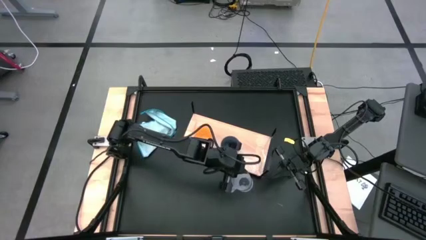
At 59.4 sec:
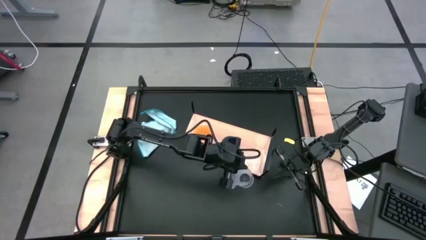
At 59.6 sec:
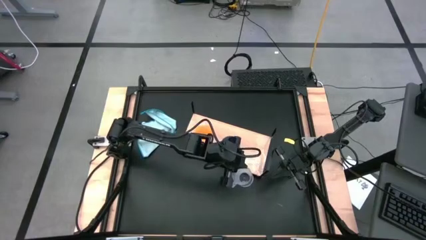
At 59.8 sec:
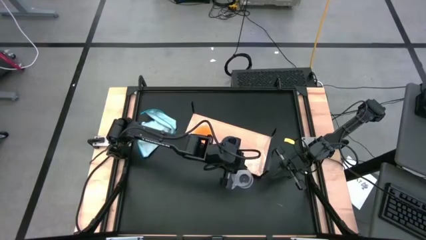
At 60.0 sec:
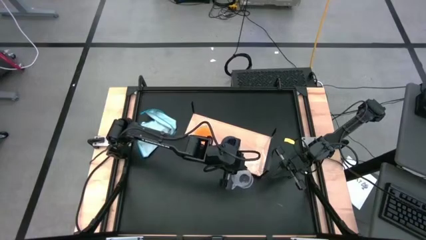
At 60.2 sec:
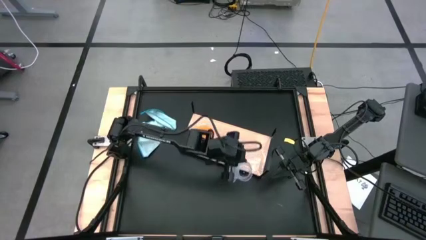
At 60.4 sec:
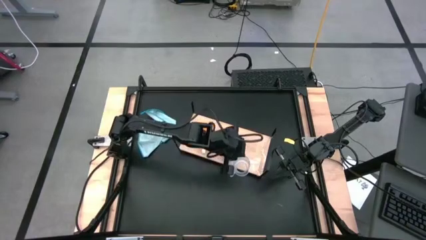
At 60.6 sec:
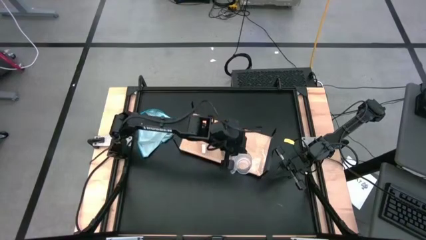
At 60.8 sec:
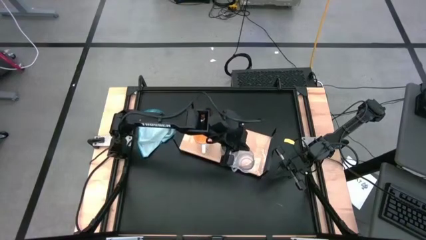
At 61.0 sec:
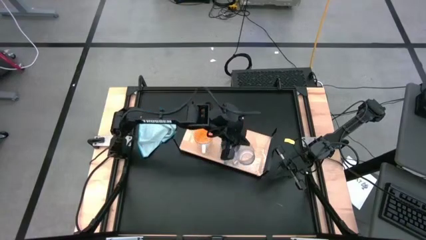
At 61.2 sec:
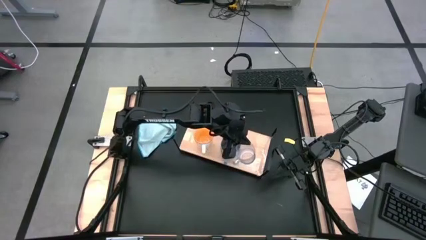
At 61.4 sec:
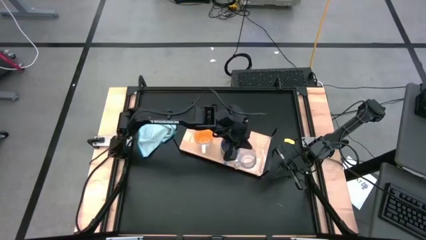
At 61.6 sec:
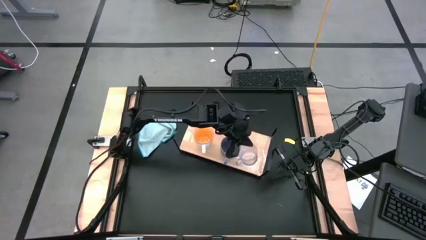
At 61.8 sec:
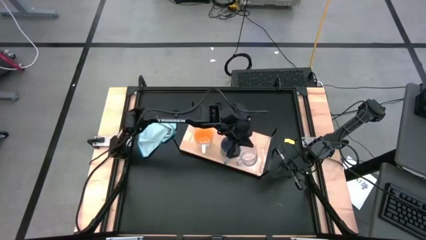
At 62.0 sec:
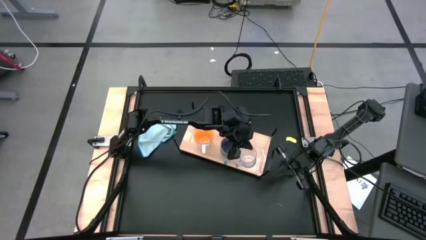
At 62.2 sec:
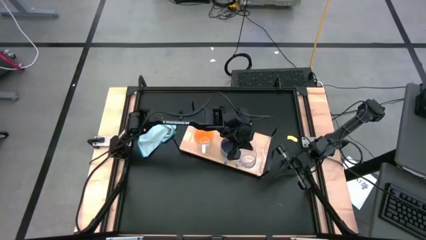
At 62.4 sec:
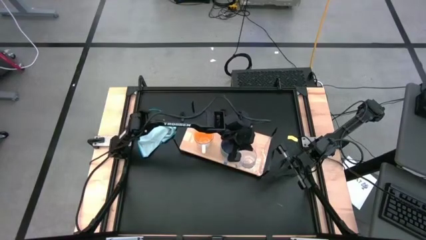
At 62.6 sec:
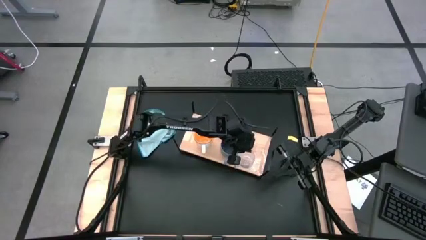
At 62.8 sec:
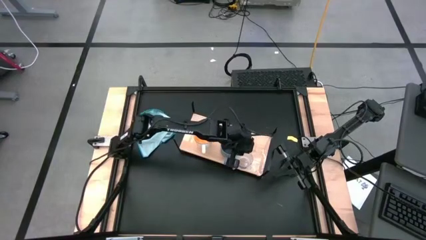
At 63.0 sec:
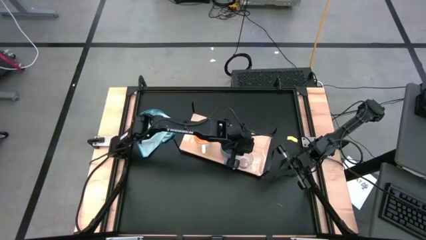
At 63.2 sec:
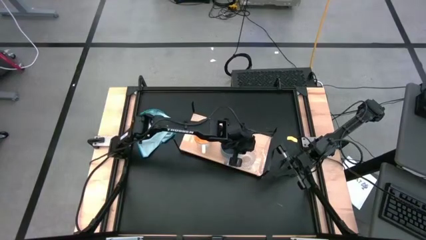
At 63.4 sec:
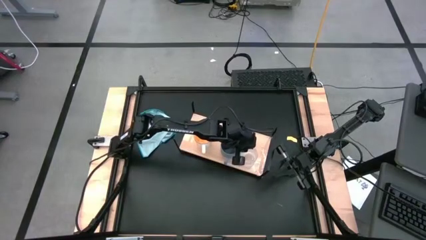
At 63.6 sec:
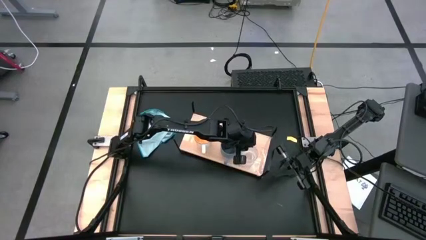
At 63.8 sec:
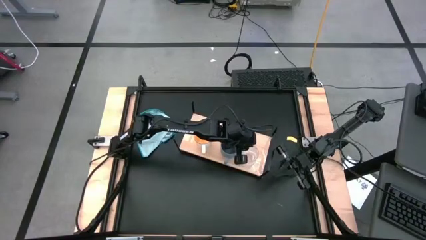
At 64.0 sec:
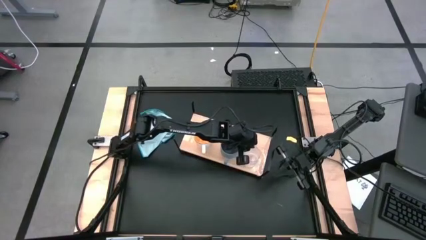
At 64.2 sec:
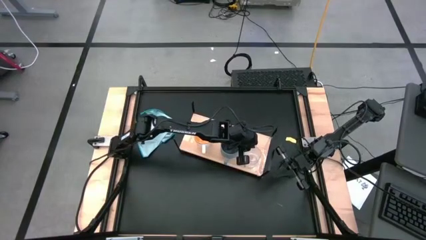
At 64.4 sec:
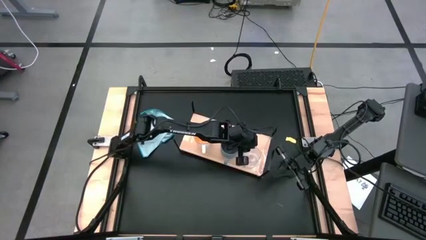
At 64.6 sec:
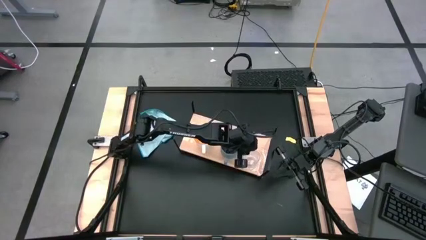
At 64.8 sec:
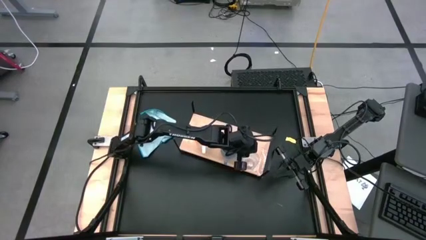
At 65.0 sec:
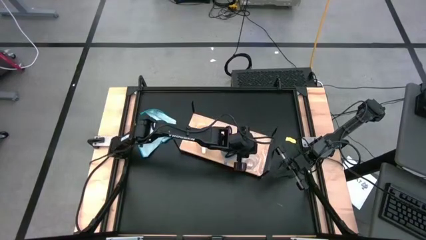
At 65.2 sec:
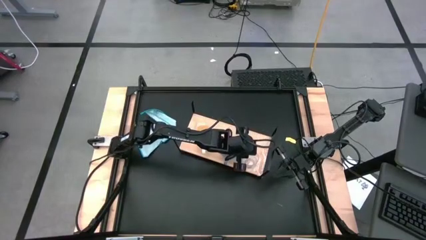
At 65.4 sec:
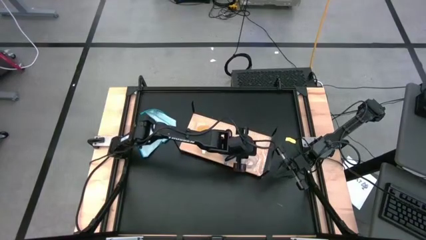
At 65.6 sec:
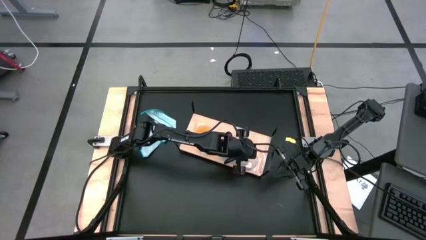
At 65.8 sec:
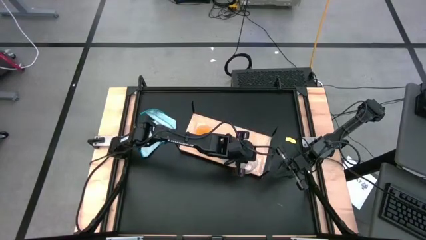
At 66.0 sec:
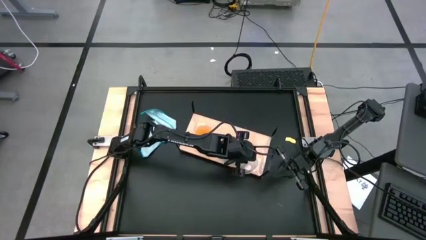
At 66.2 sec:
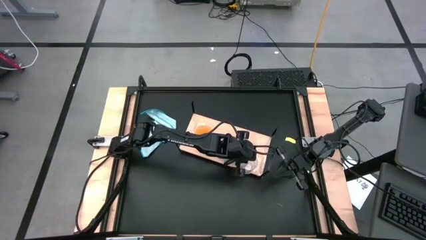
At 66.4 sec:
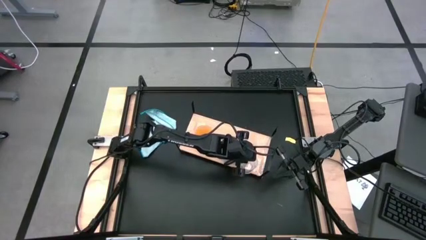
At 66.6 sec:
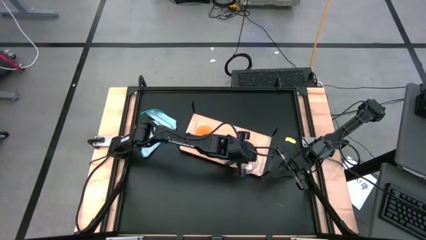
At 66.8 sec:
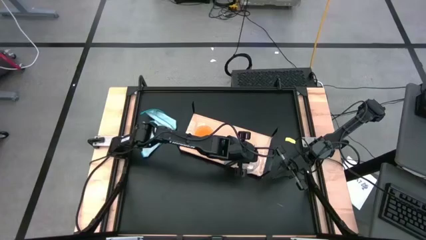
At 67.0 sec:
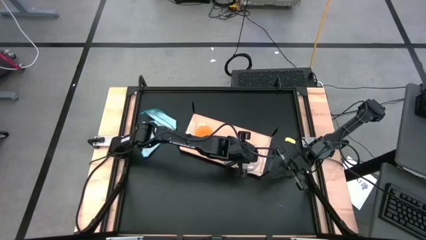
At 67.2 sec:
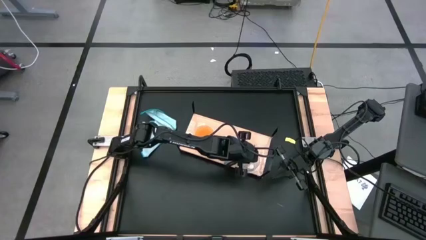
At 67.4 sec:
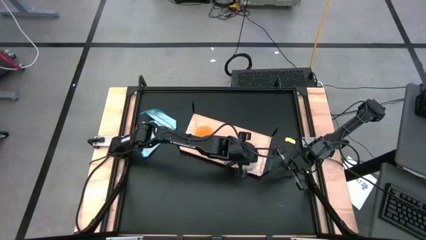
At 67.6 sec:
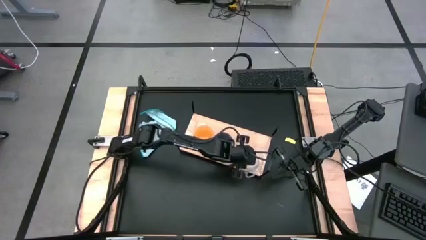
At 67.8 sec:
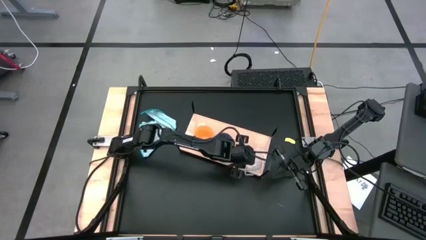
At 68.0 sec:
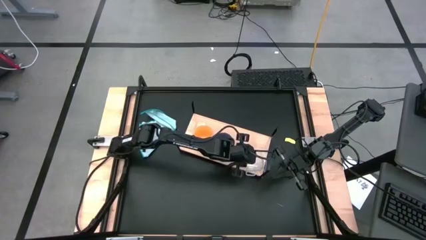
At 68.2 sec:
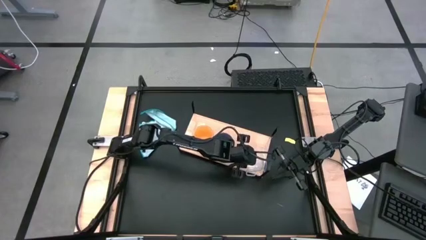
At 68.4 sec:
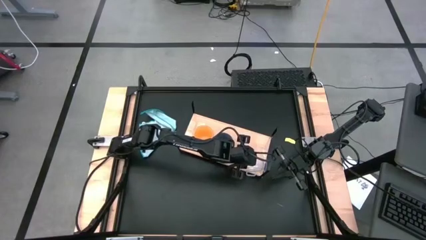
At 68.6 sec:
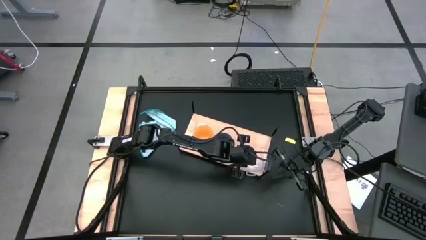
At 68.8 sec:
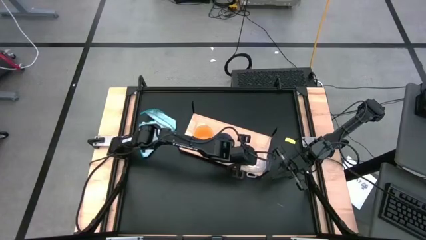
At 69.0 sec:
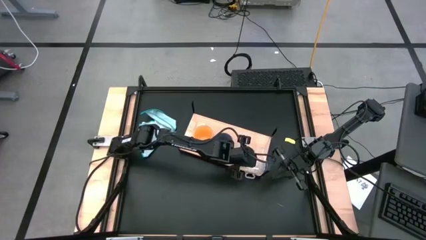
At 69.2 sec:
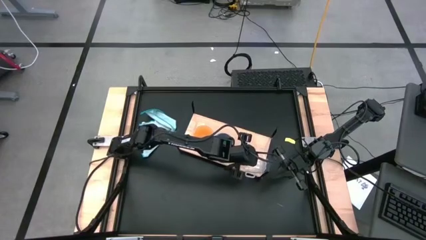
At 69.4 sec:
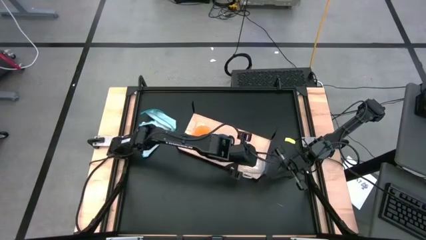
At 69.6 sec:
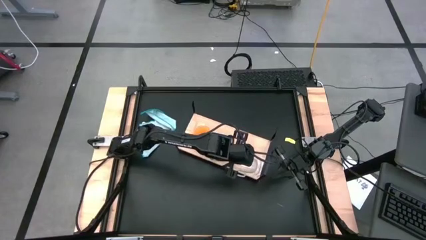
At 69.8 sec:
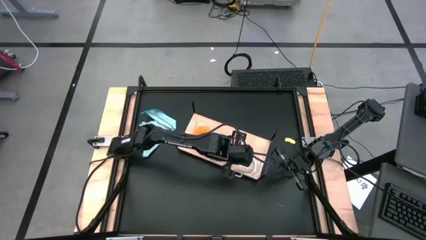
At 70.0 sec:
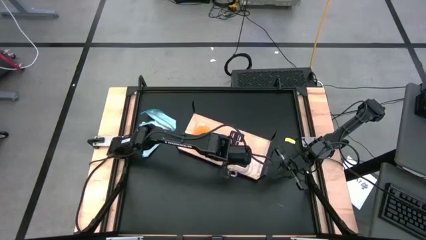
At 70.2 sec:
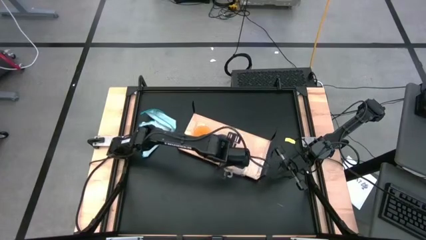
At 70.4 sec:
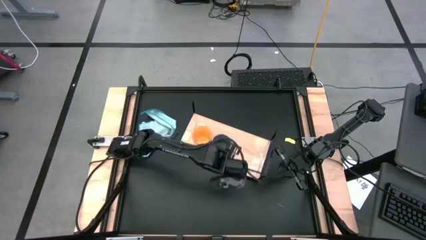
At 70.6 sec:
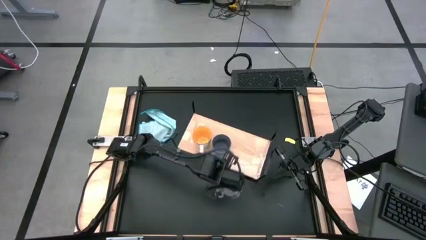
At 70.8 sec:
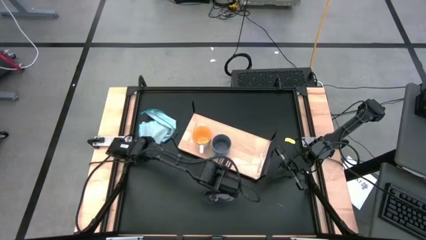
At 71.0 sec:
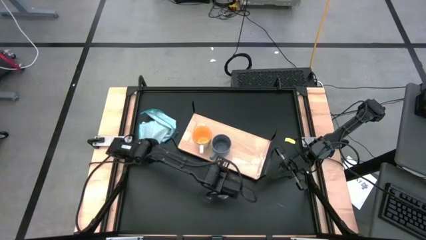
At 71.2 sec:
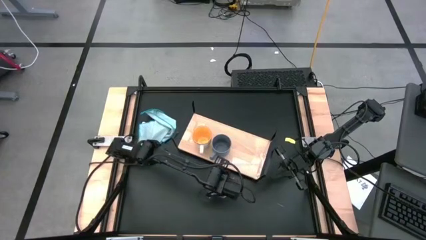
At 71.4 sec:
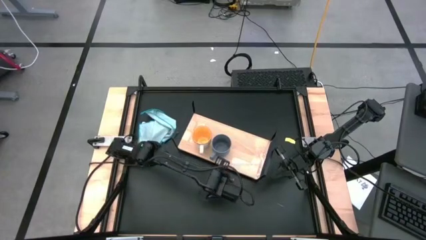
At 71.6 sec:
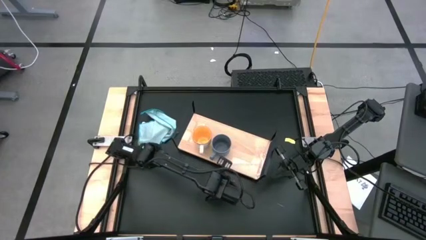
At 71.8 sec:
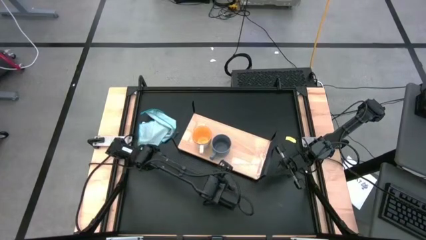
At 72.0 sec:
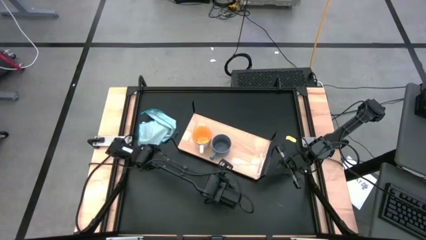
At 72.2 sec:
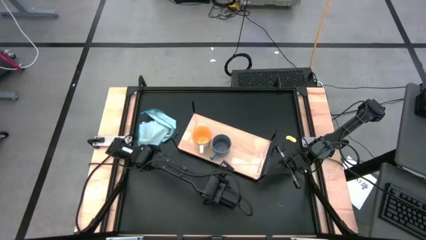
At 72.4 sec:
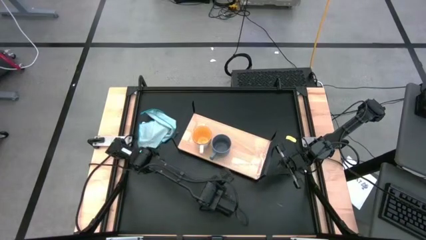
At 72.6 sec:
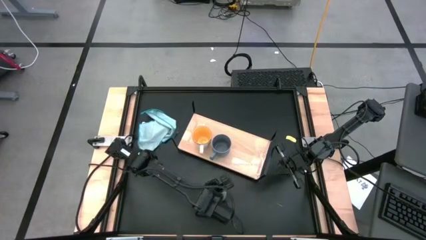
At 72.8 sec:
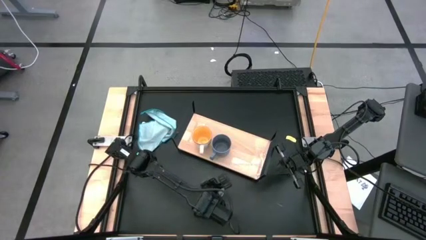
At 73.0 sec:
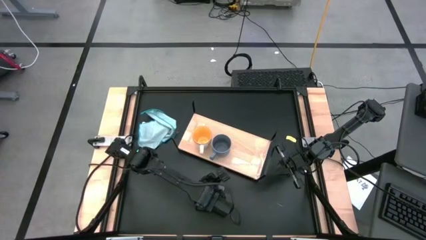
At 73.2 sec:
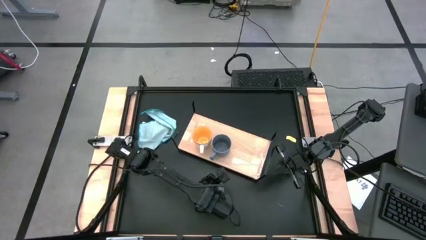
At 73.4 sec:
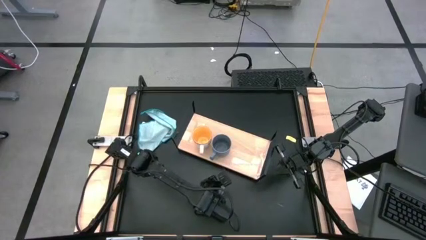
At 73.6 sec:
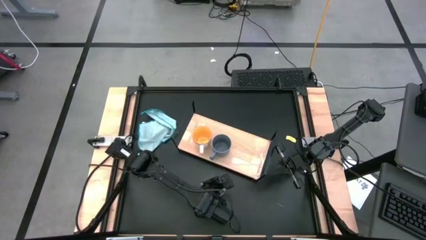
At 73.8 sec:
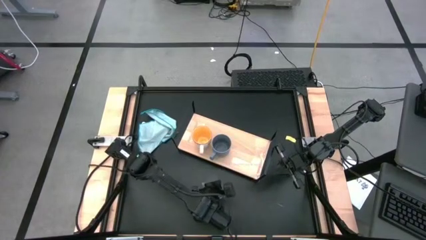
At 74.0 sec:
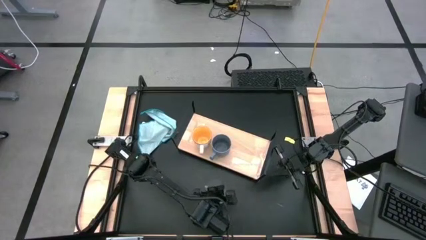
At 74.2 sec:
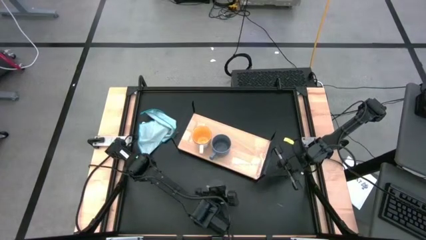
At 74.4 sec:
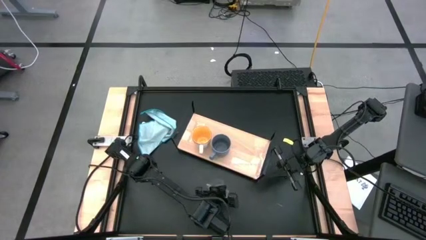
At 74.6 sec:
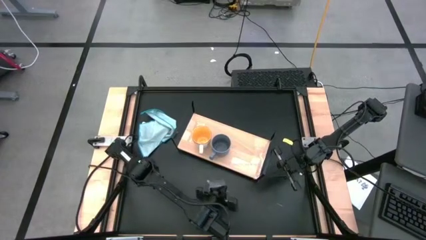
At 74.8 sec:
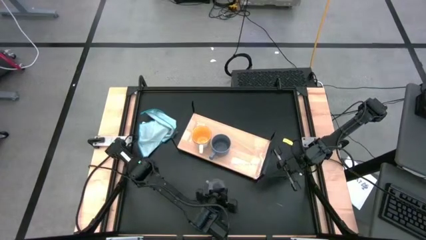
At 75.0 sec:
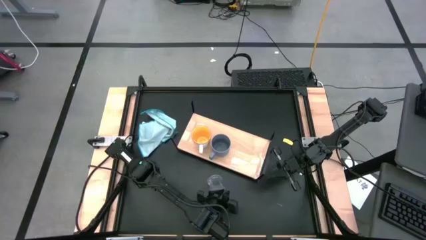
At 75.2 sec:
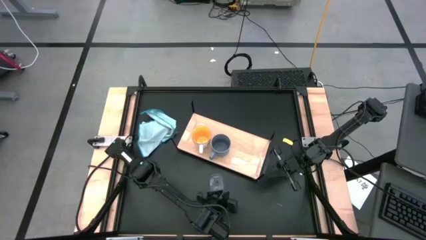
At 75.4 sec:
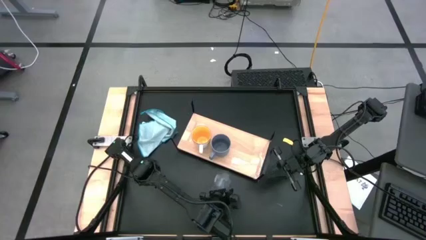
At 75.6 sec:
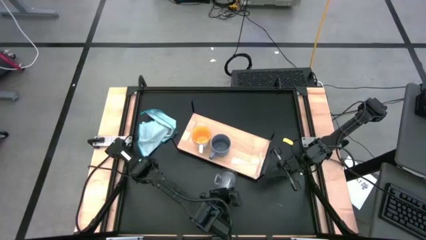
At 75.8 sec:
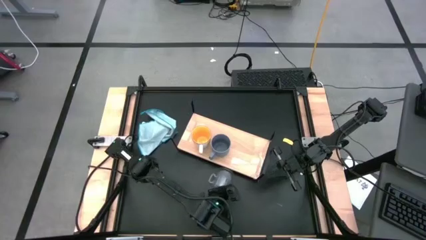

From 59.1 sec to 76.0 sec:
Task: Stack small to large cups/mugs on shelf
Put the transparent cup on the shelf
